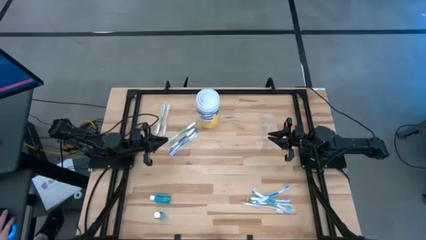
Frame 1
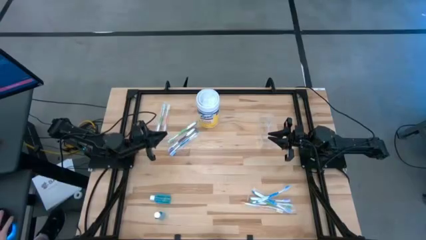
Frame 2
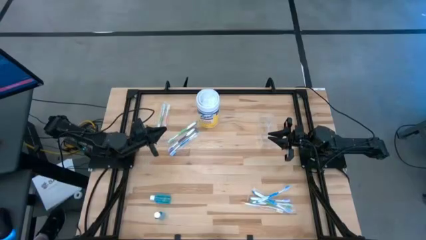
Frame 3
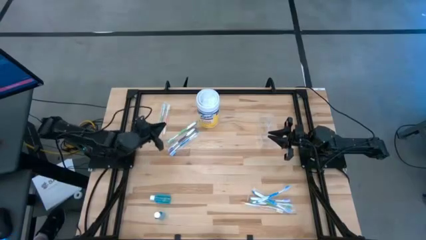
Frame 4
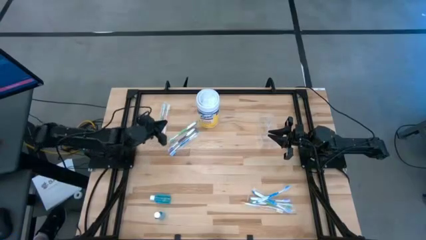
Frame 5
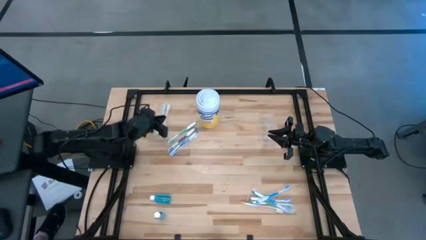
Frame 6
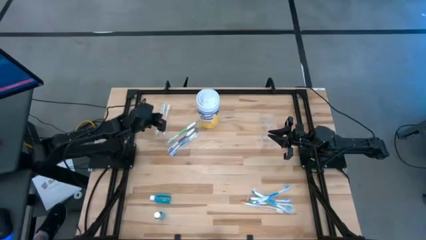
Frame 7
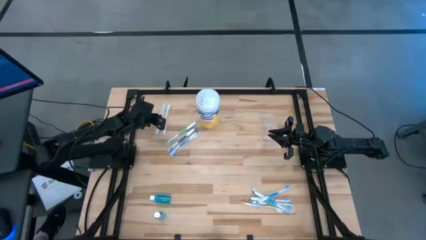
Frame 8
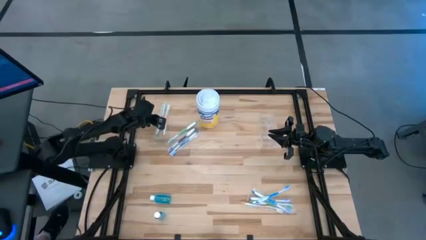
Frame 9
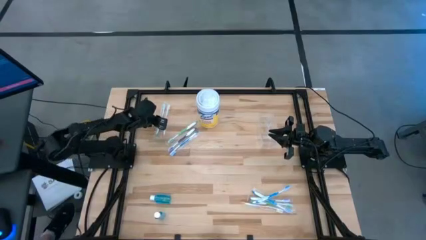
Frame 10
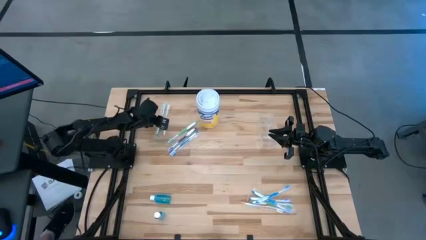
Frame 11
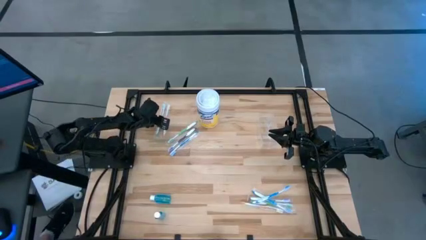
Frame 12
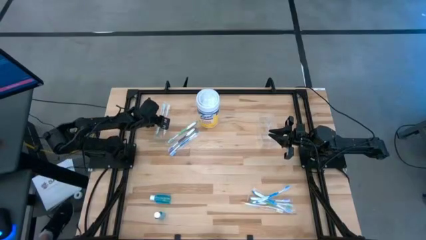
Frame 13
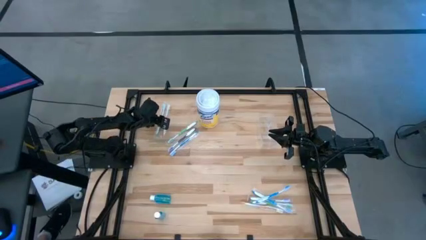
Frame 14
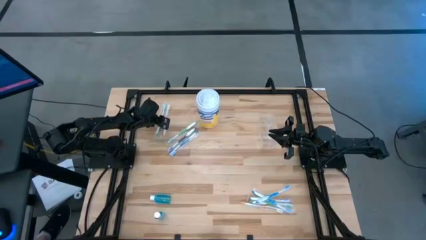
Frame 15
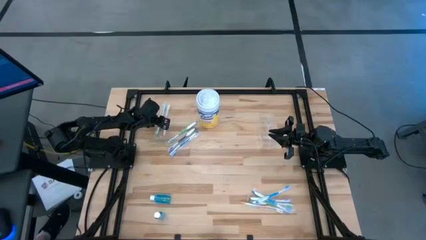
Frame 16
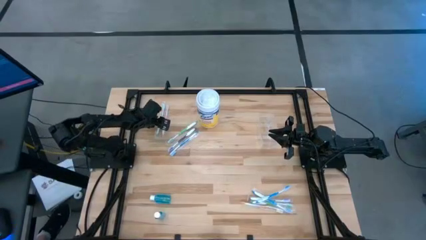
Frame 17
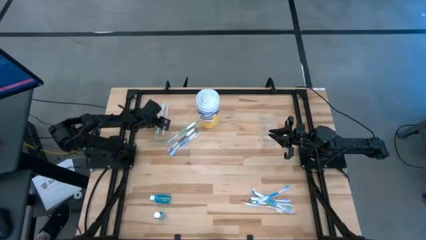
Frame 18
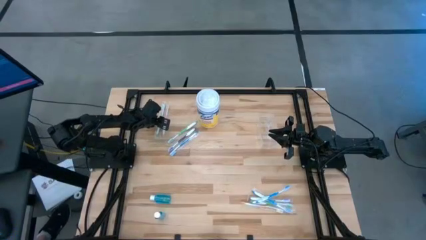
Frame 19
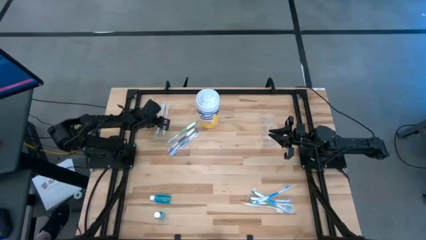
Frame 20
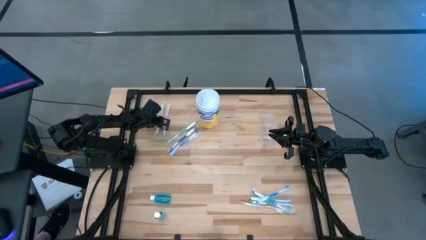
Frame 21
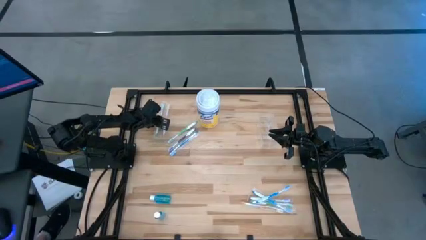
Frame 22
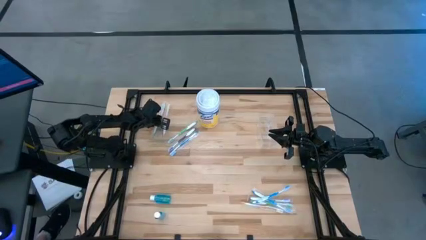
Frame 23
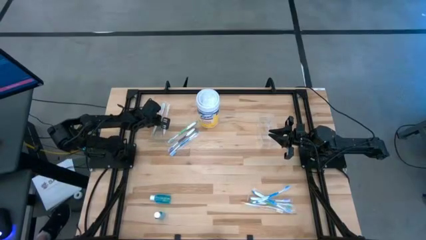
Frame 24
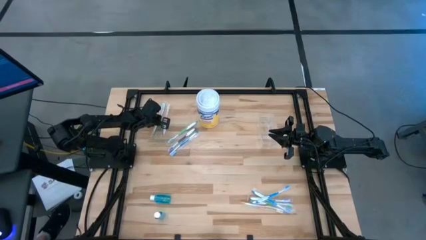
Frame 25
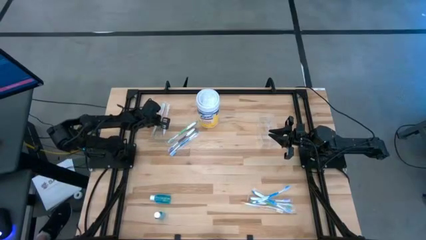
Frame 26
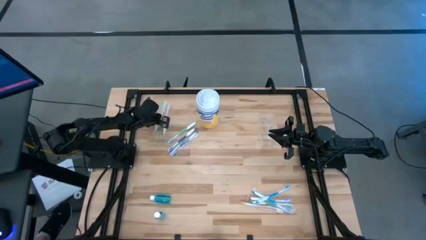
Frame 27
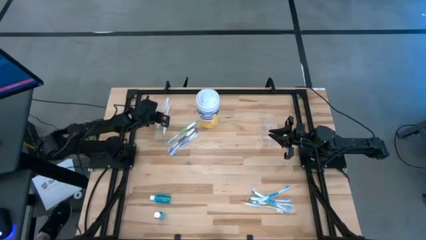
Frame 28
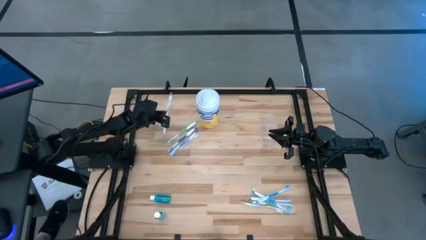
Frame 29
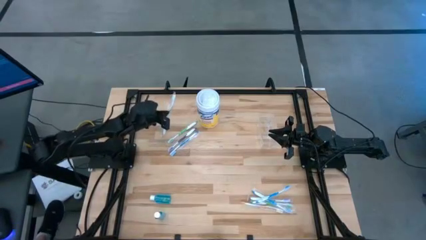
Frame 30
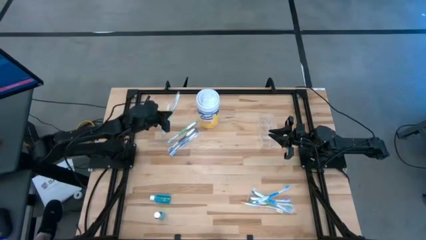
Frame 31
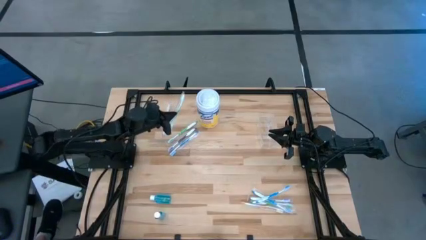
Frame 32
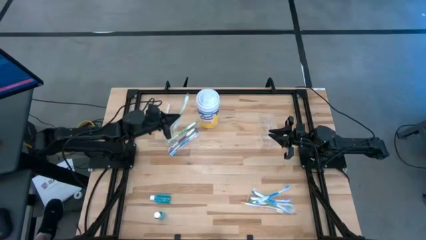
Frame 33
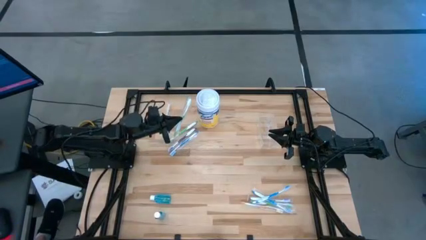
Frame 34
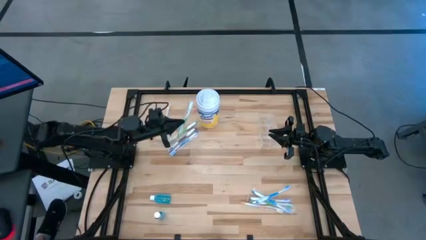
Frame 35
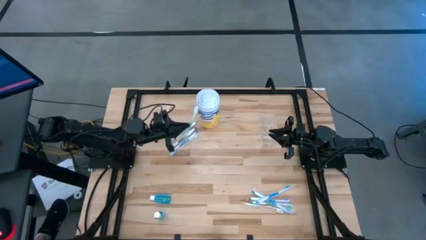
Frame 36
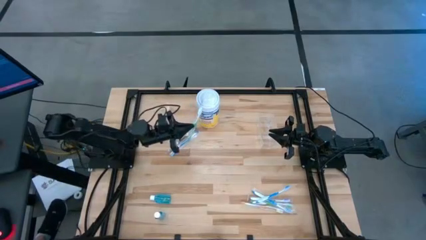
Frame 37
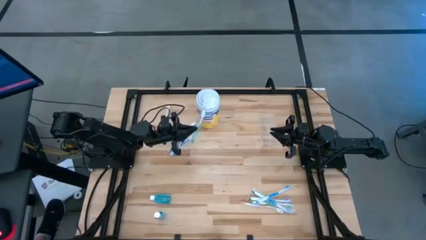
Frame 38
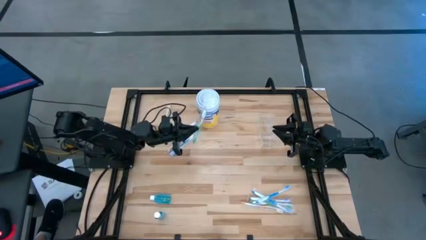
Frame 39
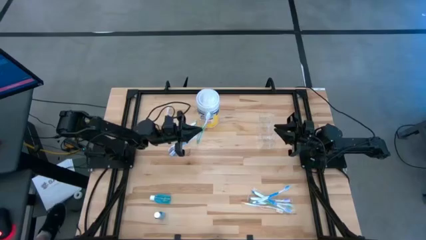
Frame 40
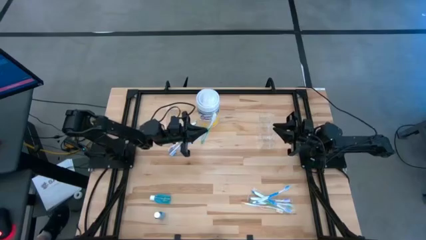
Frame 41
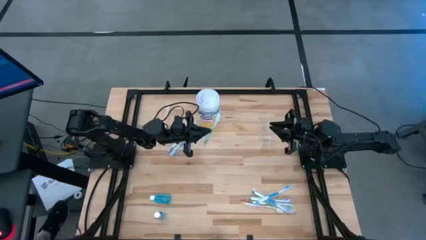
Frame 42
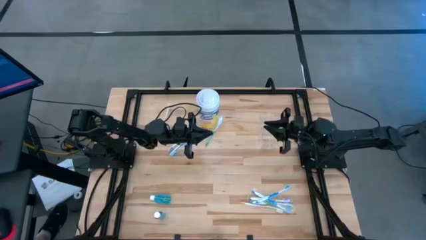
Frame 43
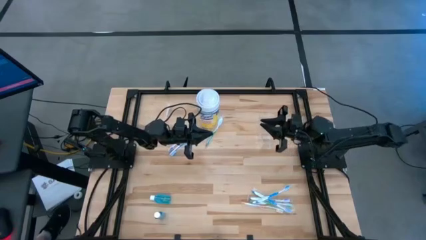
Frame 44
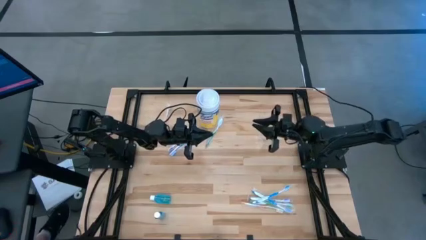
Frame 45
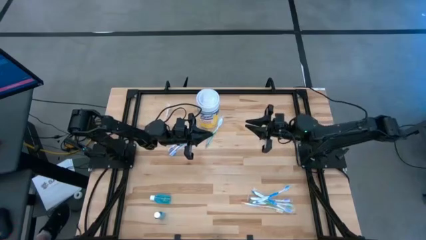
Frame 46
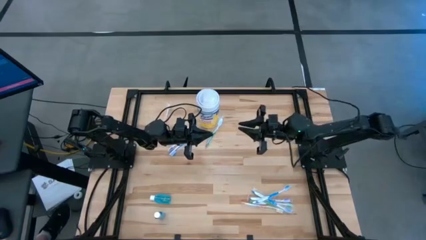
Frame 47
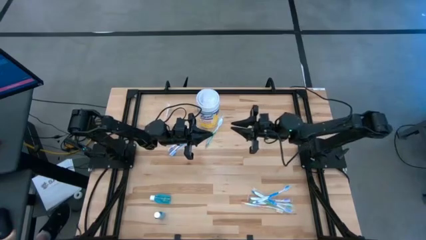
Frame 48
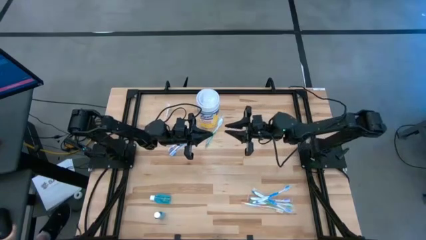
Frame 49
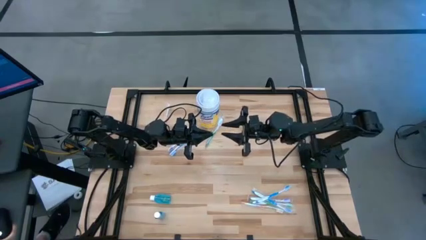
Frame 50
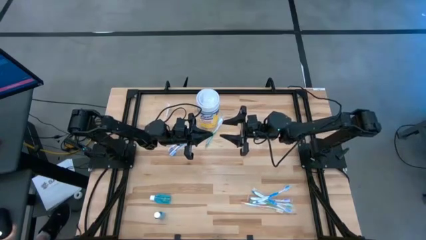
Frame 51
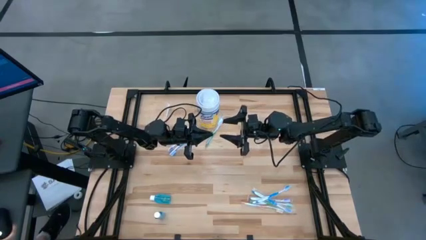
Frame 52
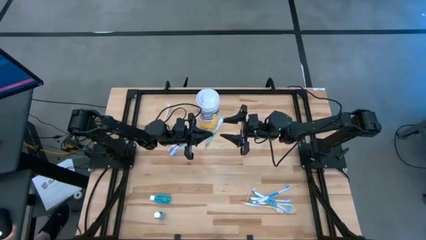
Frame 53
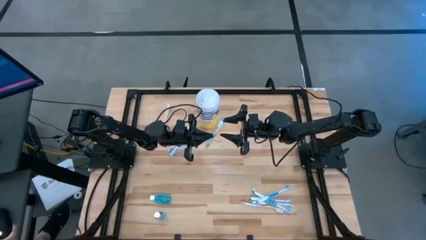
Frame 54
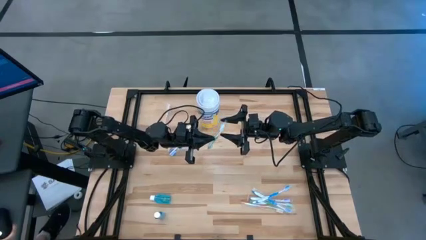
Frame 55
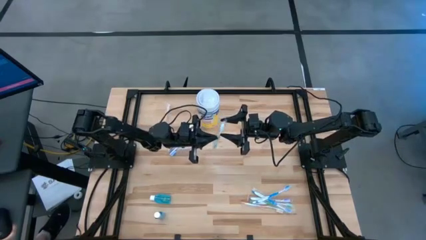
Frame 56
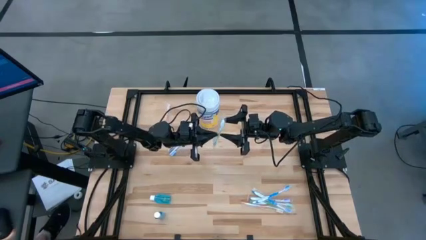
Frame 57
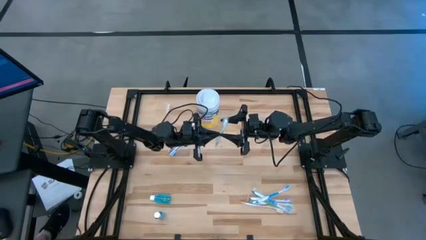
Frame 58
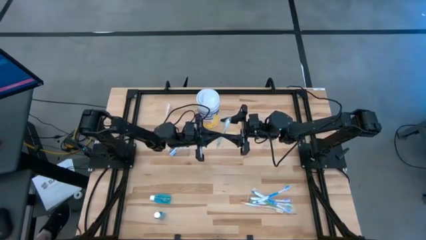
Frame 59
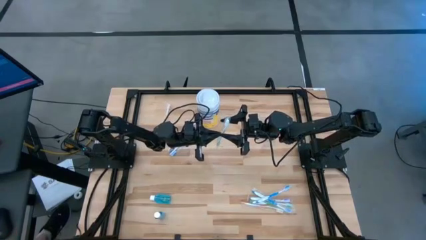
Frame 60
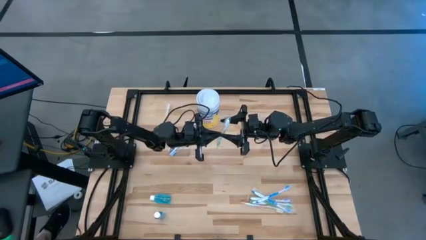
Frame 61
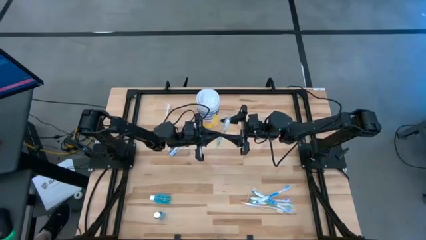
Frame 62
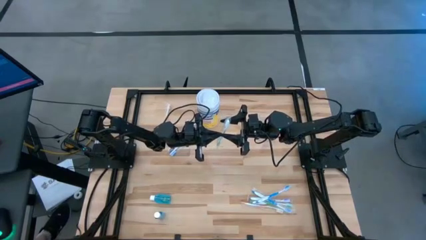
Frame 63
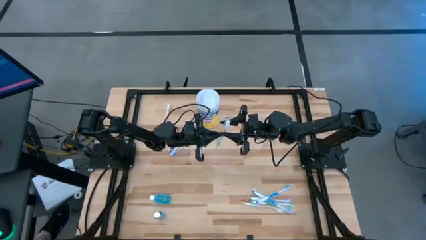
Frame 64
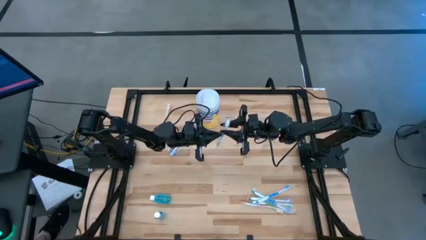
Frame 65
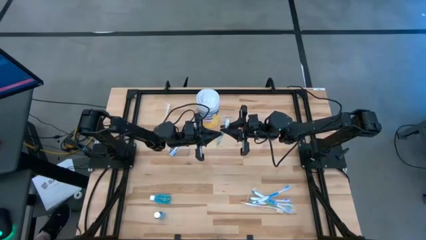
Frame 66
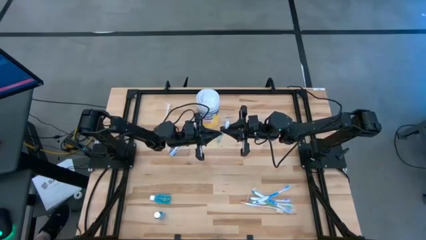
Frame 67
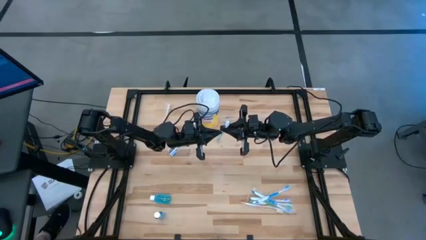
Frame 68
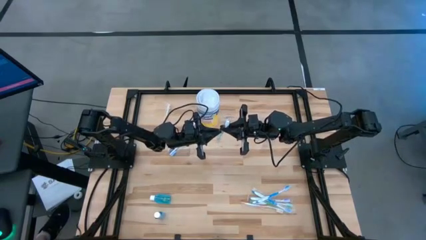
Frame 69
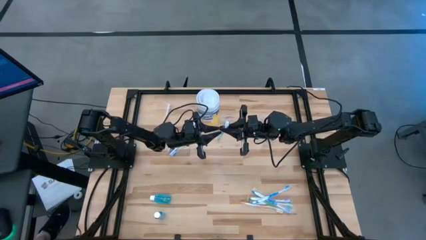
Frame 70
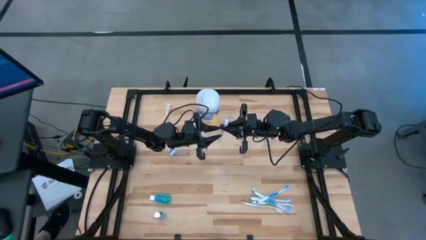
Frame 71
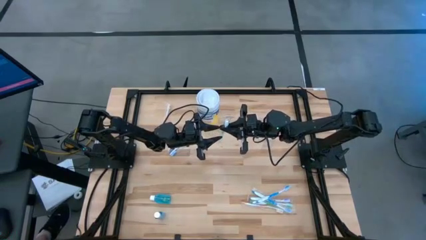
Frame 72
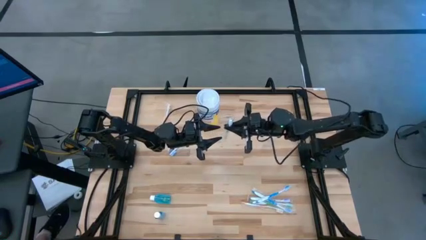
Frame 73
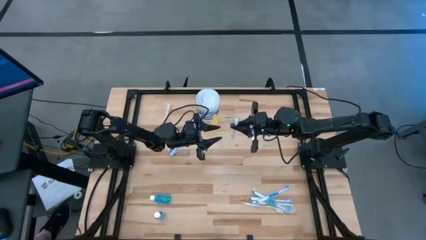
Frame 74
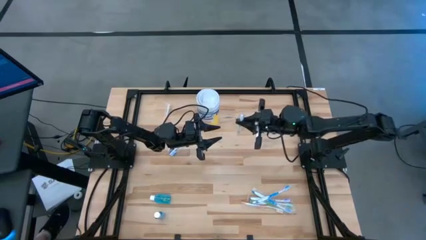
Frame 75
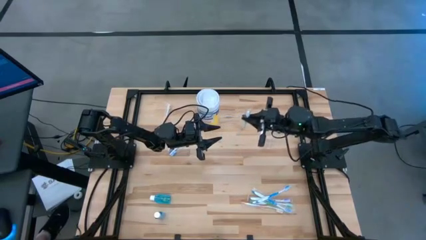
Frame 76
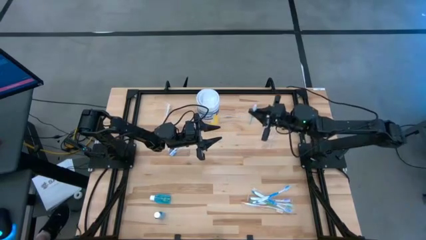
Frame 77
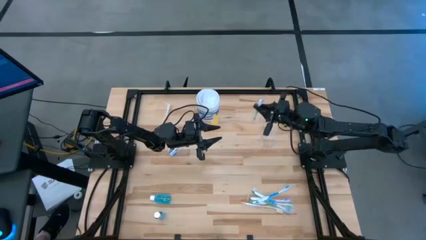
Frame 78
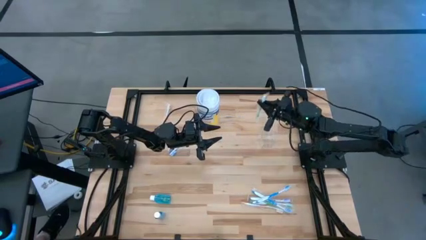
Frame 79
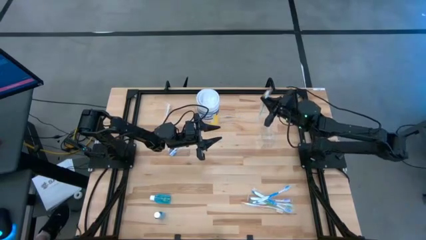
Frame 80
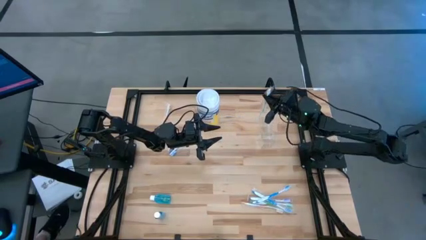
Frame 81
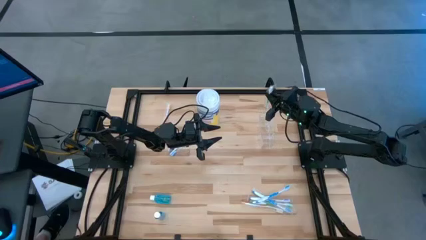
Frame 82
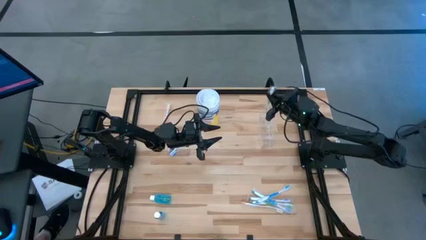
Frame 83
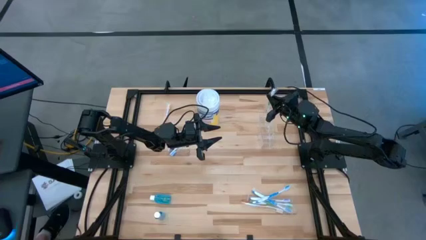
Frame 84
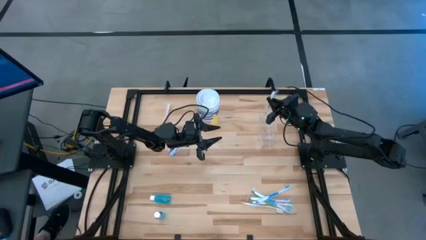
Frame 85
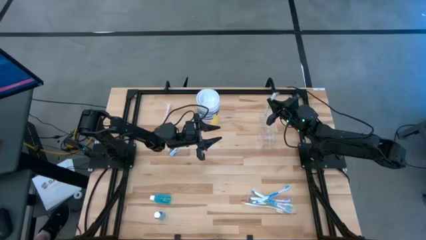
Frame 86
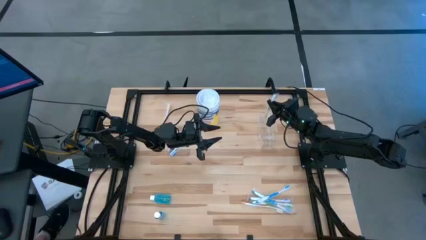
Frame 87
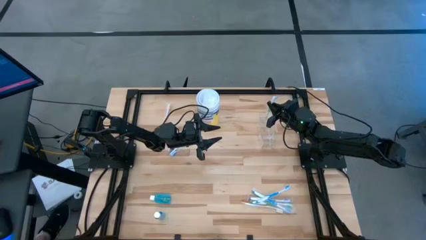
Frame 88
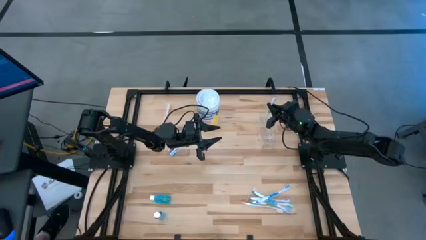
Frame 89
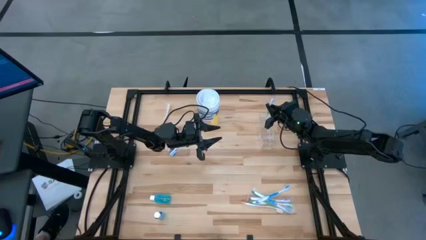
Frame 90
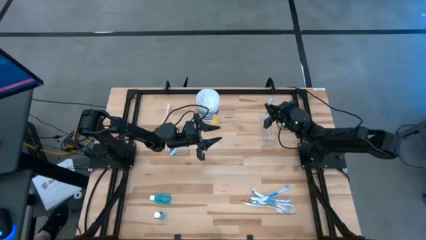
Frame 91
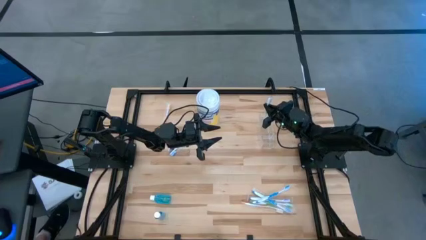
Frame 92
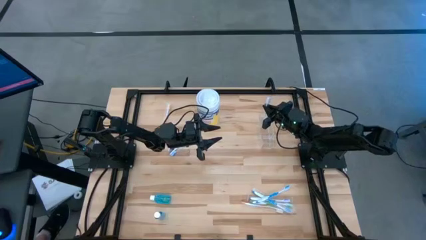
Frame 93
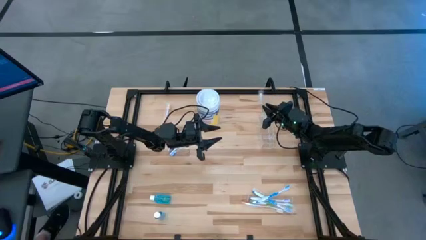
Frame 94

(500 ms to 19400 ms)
Task: Pick & Place toothbrushing station
Put the top green toothbrush into the transparent organizer
